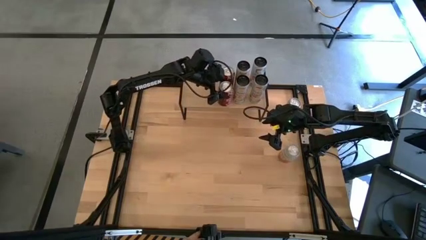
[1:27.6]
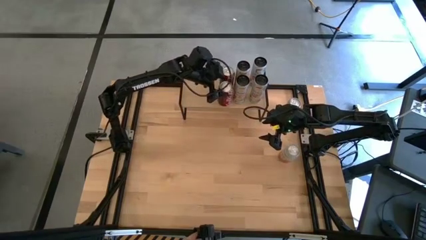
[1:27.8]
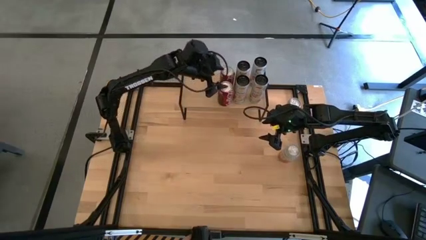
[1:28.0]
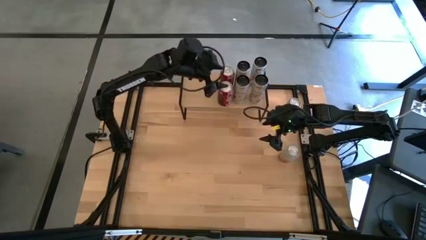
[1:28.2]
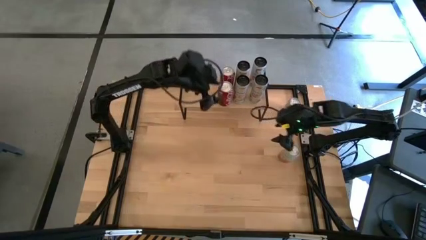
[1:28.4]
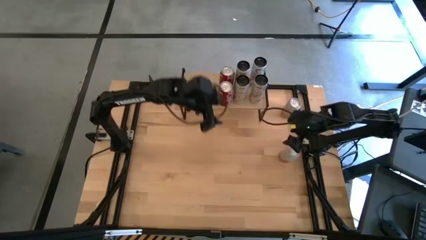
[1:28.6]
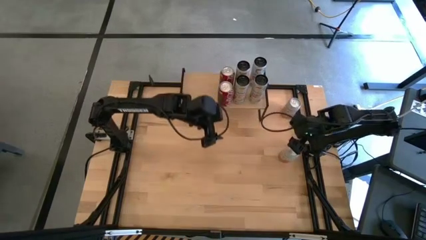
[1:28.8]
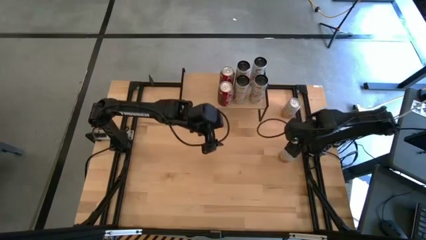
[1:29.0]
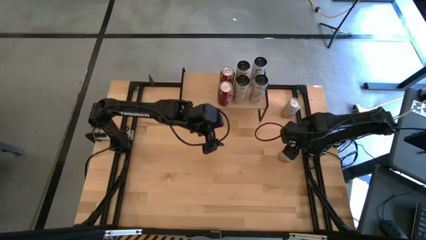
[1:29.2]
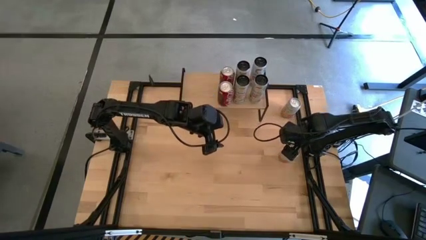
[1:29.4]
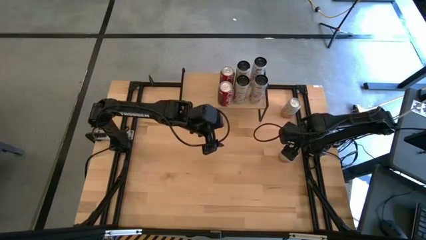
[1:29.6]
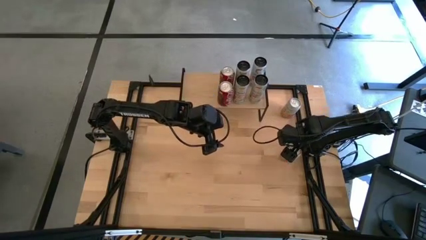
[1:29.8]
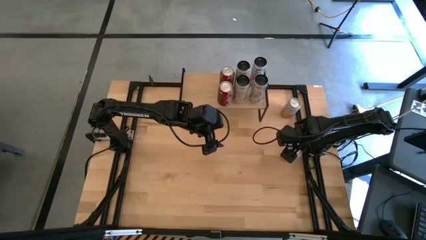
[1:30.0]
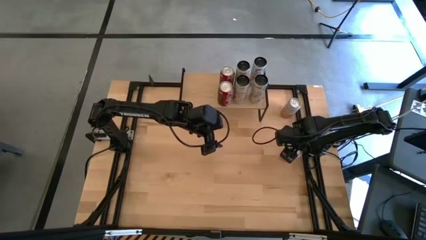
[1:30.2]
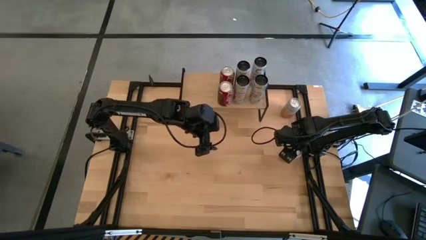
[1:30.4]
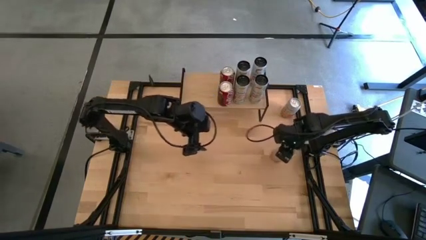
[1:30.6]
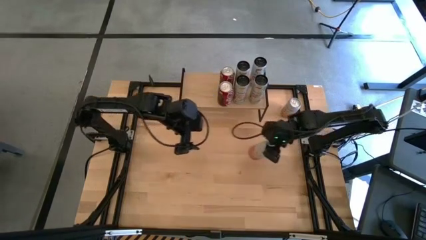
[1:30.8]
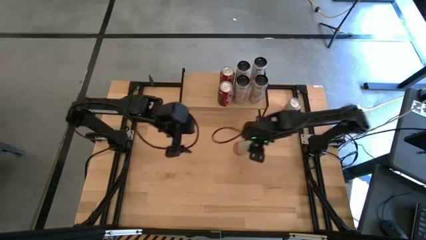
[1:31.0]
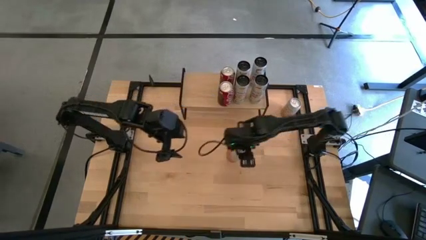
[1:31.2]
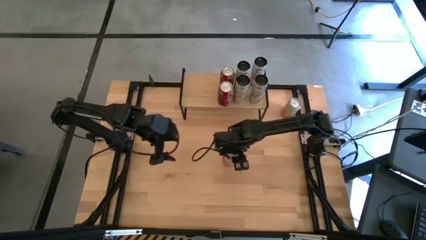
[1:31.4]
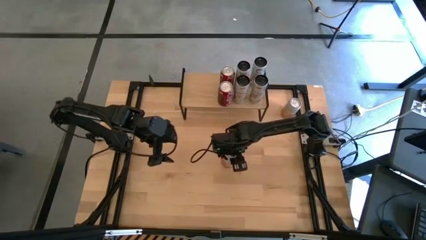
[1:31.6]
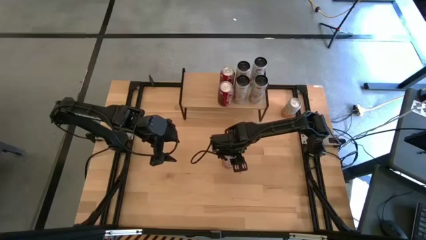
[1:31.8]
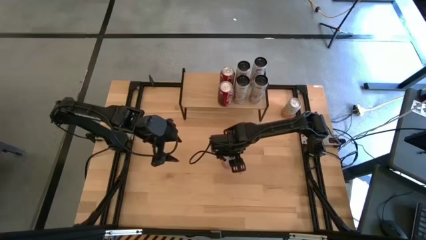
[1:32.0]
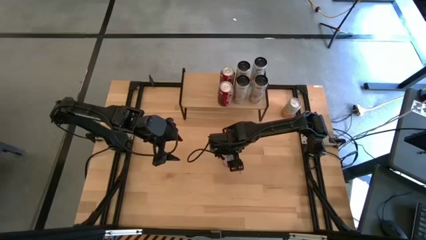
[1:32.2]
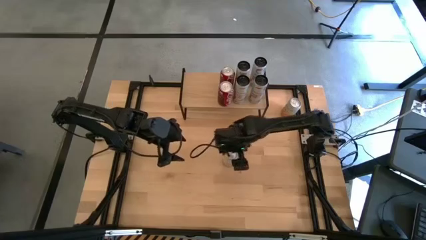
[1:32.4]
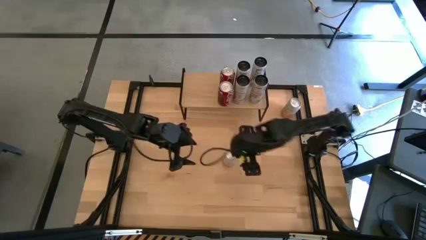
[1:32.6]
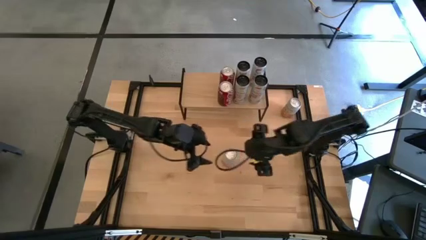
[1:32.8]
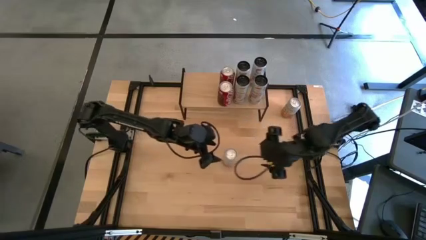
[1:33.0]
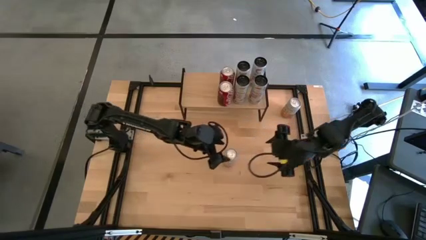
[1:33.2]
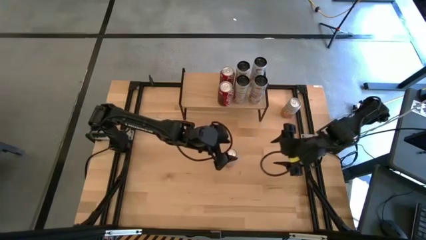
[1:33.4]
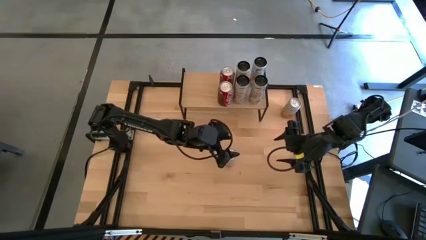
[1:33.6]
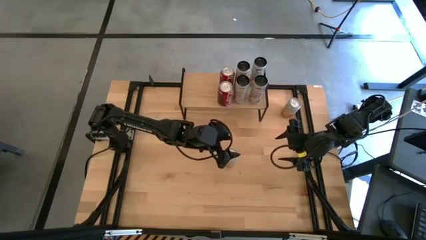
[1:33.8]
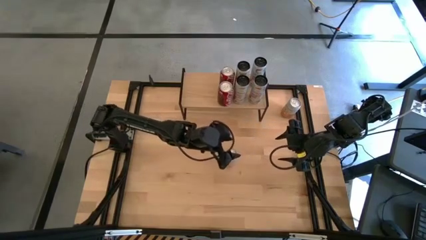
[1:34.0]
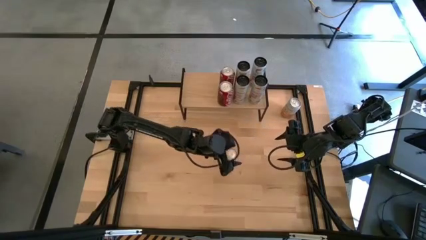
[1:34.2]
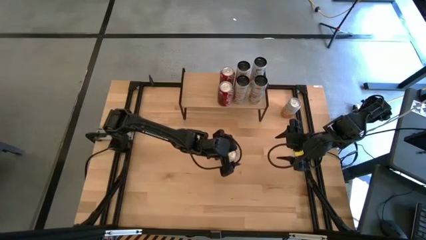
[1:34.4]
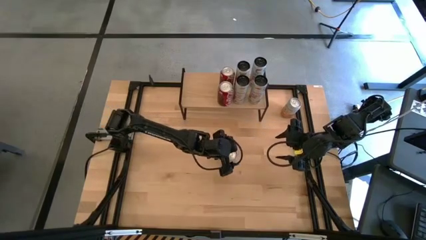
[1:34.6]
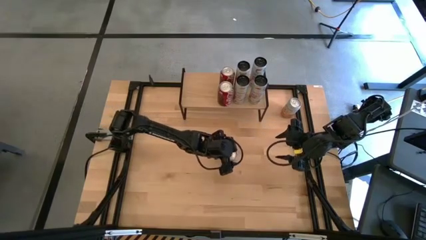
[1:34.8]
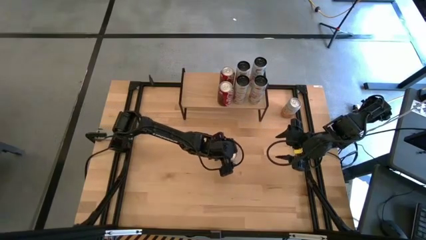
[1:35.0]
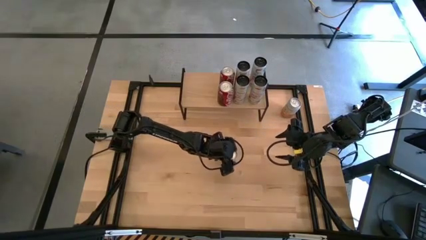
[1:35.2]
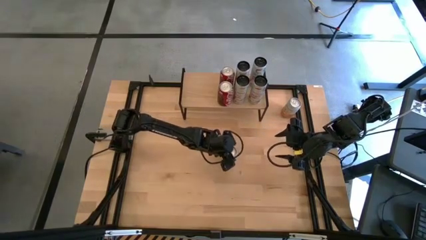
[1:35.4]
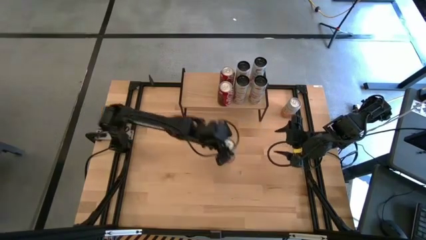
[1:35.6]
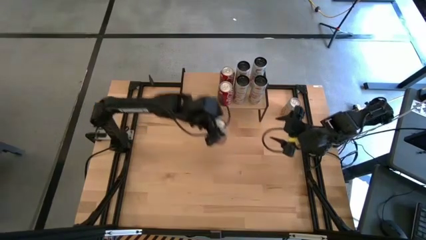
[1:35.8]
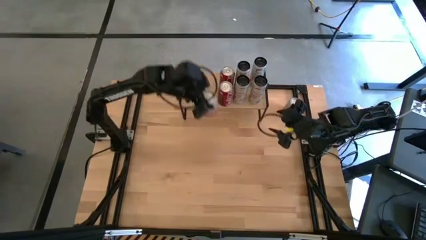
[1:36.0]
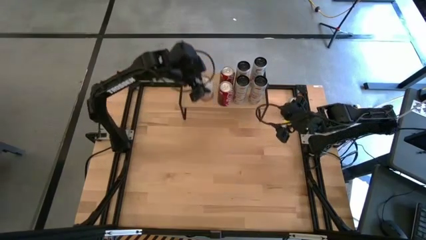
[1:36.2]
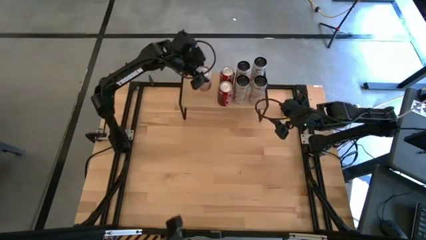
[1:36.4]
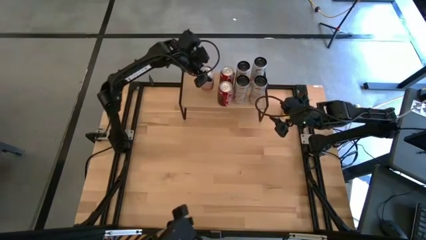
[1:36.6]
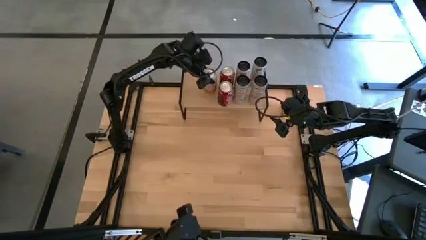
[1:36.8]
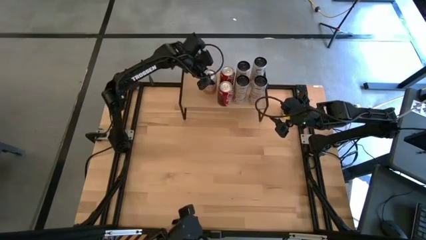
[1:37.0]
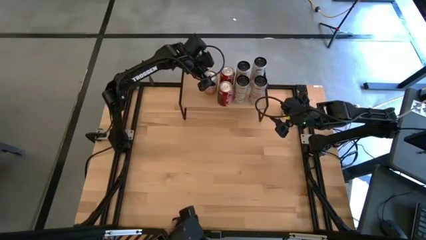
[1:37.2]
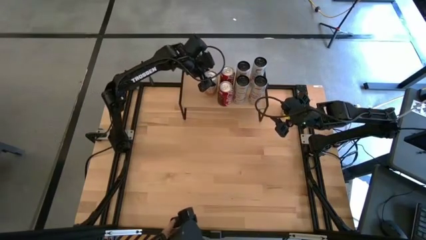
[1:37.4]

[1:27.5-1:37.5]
Task: Place canned beverage on shelf
Put the bottom yellow-white soda can on the shelf

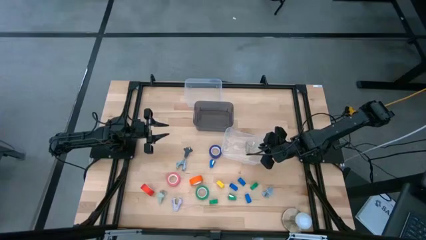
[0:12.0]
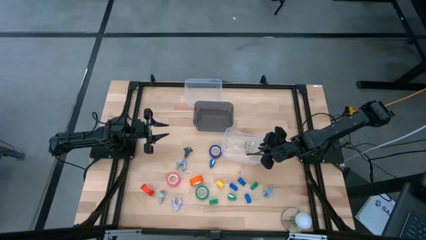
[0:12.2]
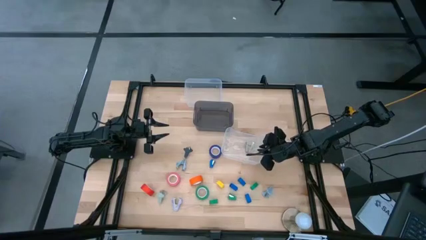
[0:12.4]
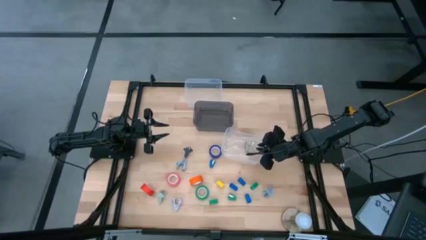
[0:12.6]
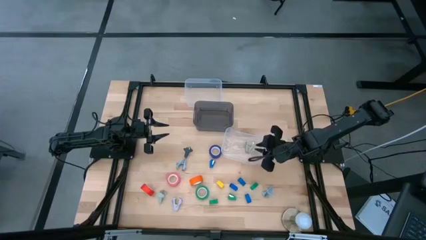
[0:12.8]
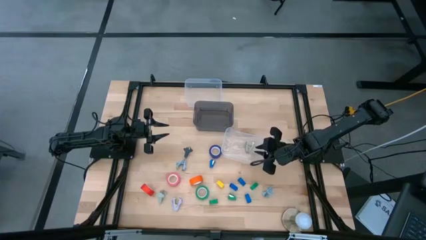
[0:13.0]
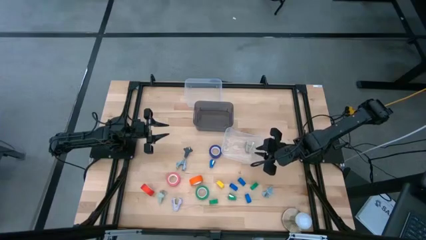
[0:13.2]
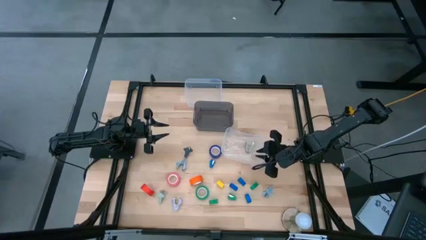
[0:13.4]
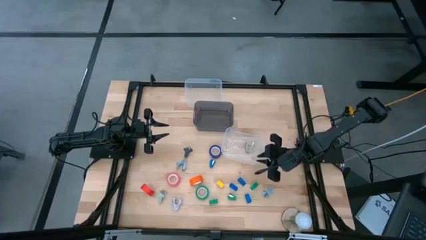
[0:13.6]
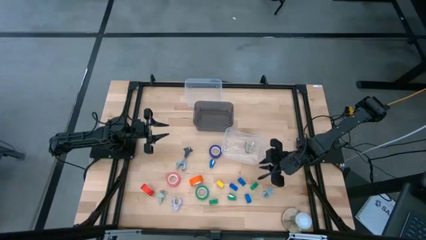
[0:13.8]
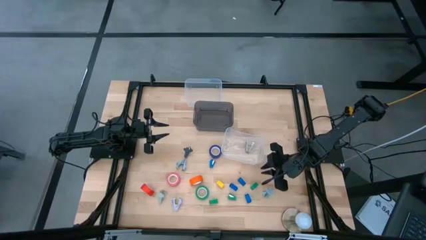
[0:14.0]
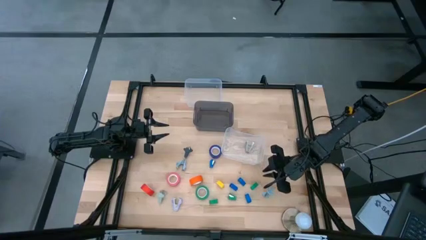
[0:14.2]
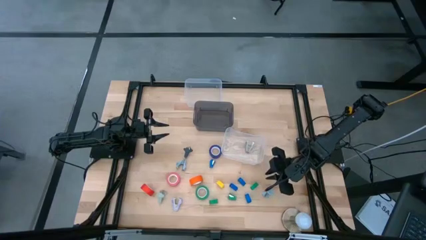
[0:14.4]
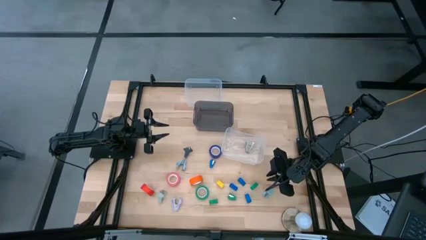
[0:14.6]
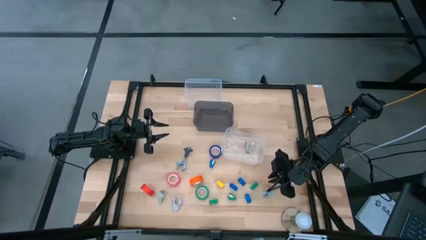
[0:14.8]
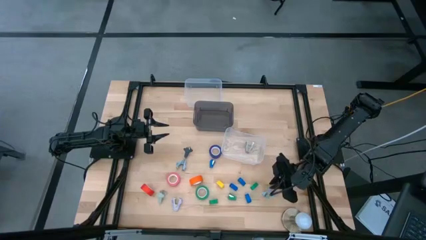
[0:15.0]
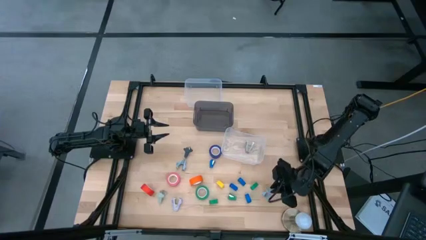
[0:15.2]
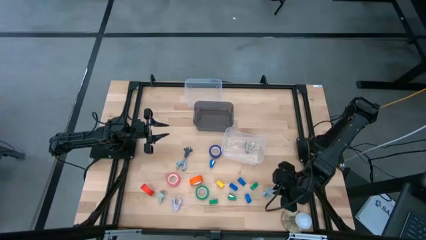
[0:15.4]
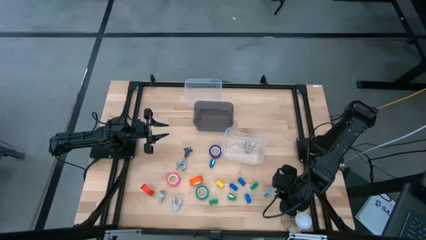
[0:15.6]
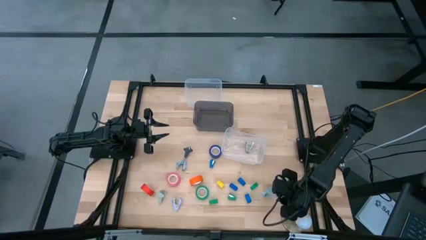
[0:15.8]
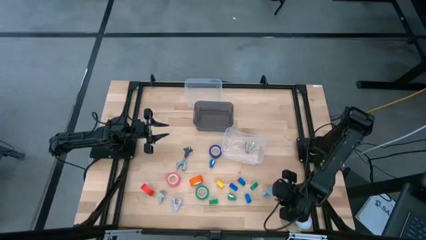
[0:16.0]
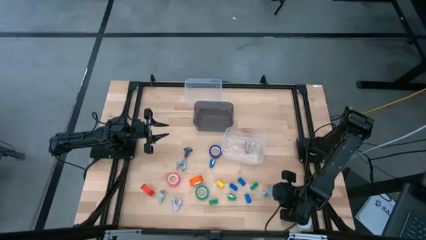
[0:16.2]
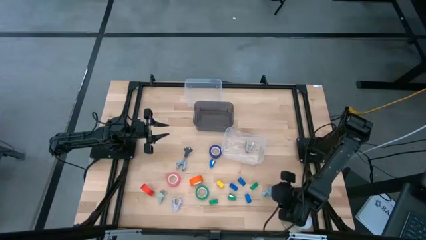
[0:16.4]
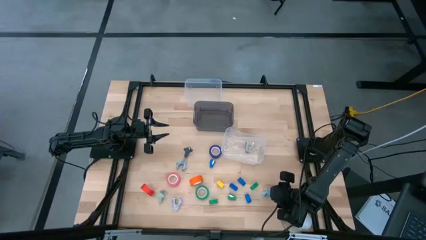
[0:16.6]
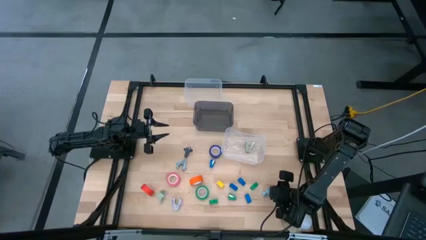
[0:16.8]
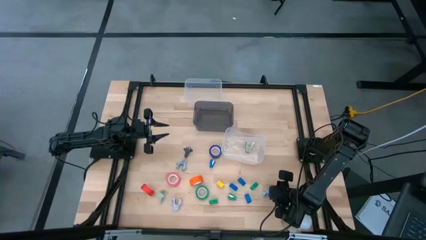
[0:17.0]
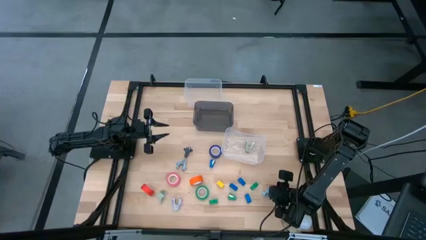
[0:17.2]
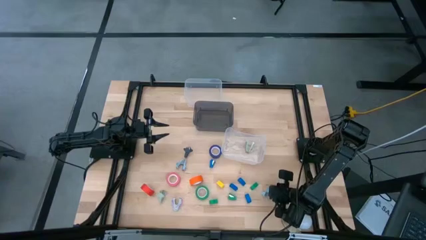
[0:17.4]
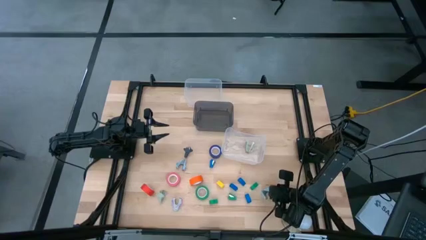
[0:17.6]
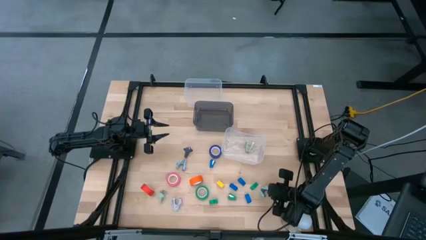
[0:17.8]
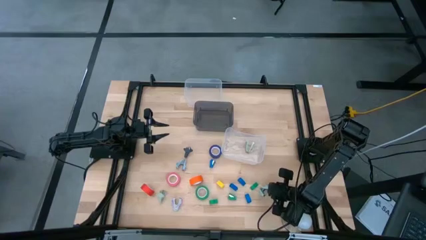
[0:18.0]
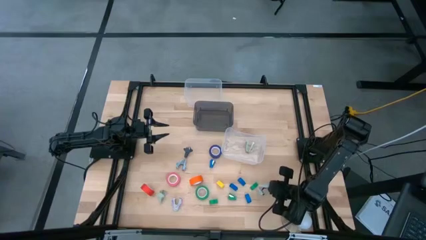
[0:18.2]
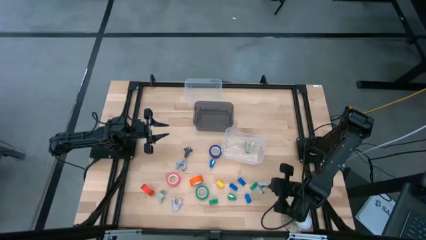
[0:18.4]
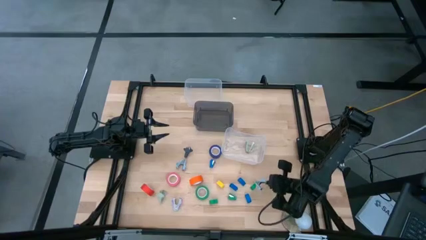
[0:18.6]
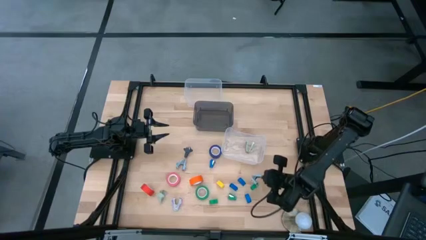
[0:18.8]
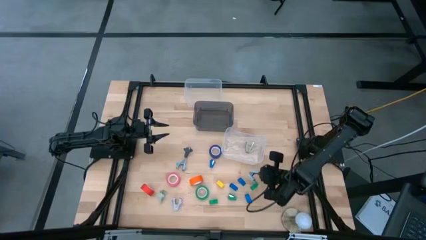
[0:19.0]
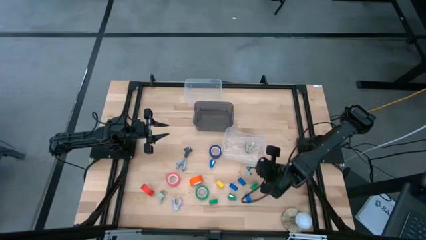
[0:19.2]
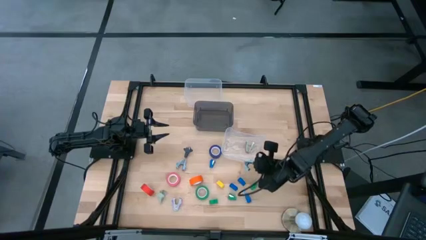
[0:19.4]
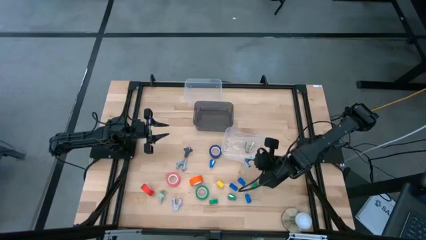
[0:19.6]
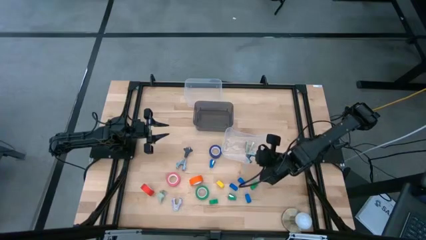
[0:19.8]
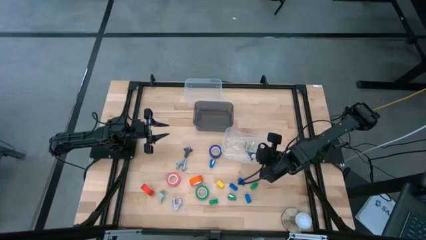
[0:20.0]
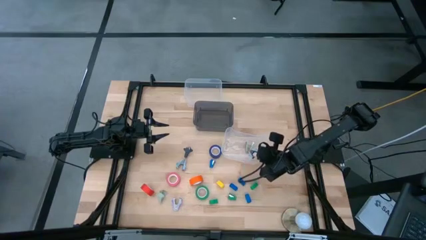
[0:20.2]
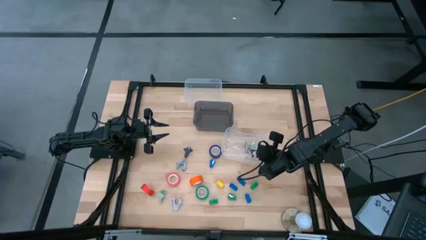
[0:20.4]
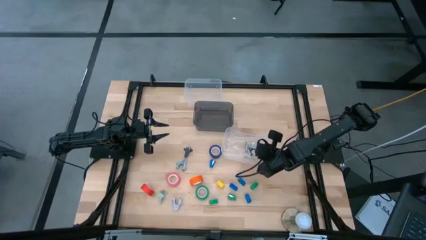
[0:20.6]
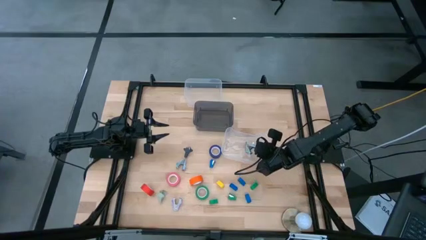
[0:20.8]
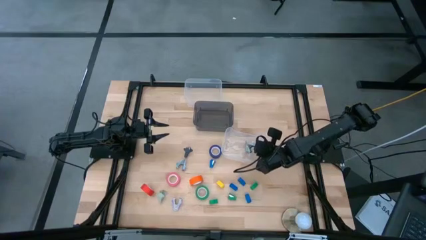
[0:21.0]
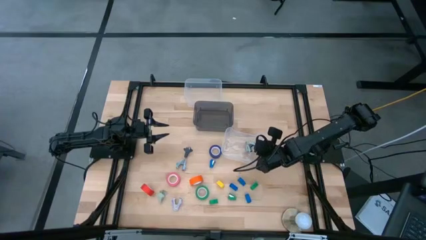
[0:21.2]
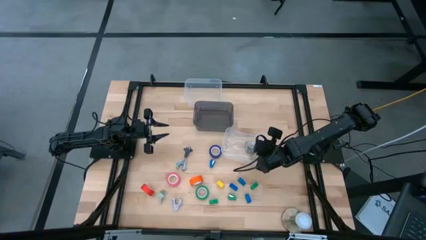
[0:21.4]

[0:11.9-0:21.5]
Task: Pick and place Stapler, Stapler remover, tape
Put the blue staple remover into the bottom transparent bin
